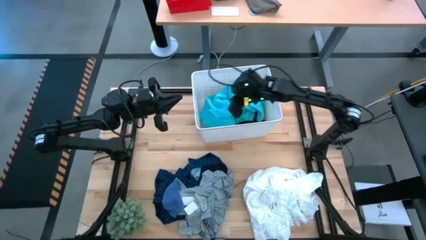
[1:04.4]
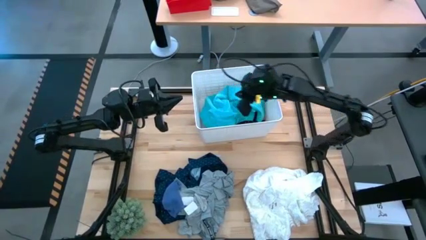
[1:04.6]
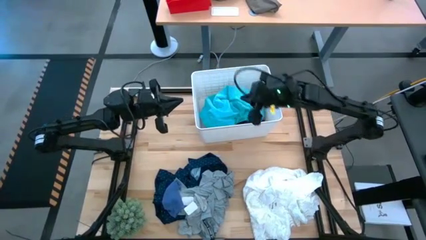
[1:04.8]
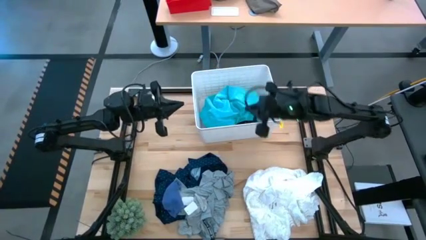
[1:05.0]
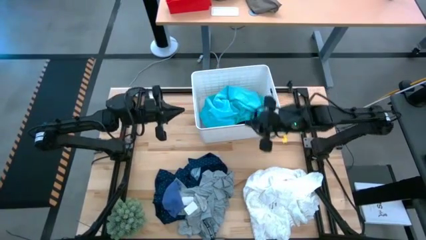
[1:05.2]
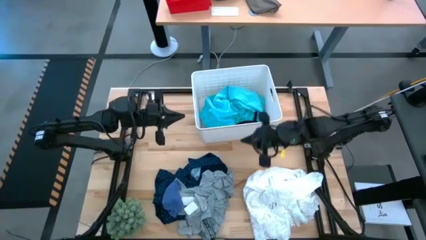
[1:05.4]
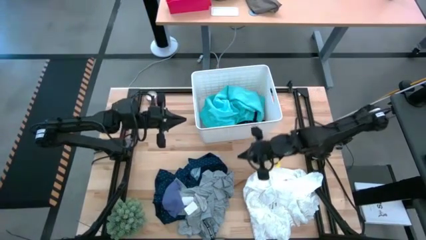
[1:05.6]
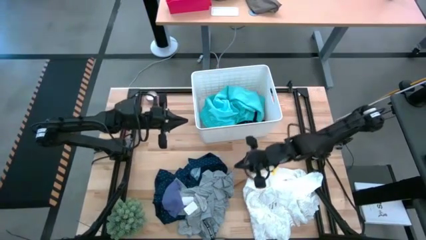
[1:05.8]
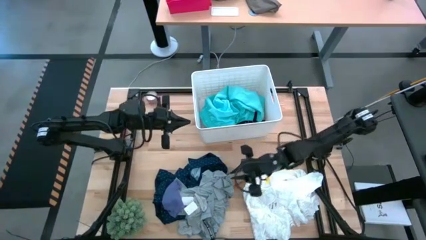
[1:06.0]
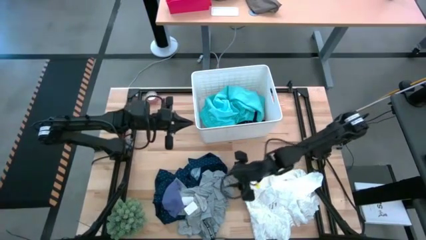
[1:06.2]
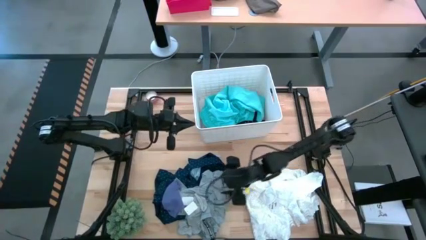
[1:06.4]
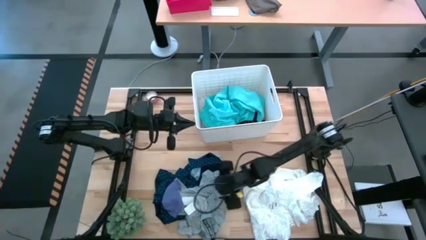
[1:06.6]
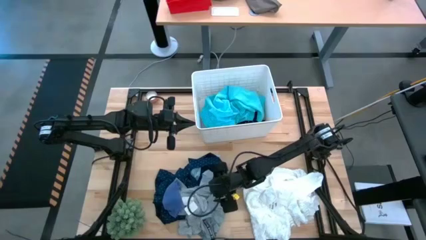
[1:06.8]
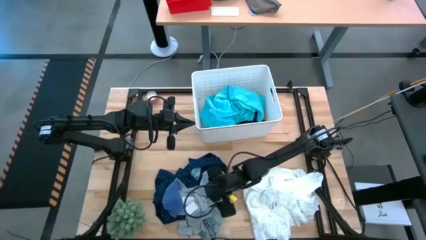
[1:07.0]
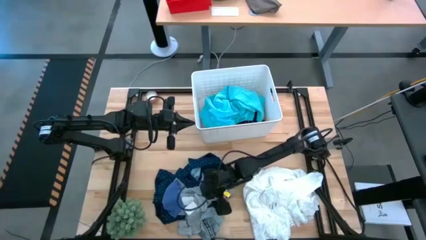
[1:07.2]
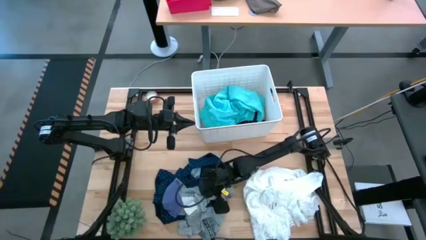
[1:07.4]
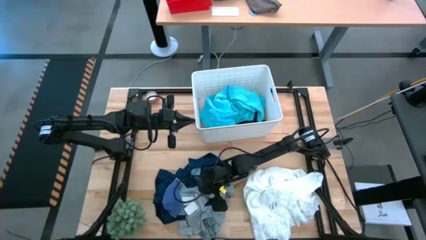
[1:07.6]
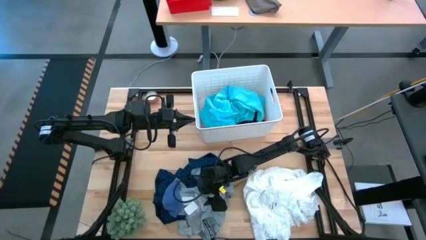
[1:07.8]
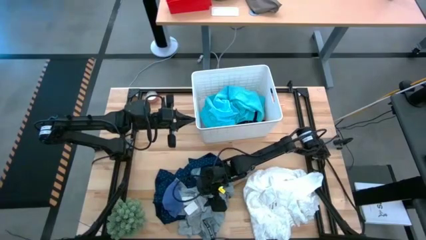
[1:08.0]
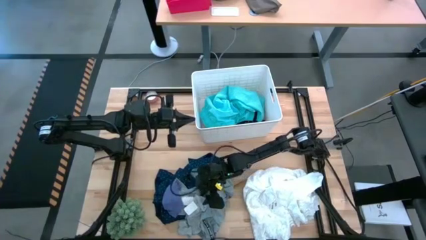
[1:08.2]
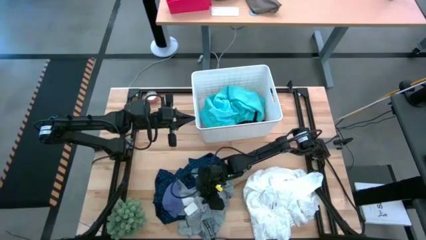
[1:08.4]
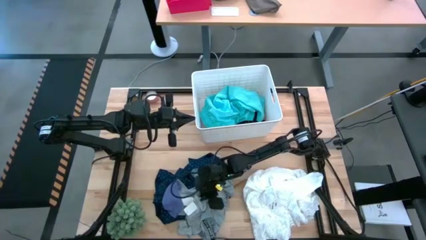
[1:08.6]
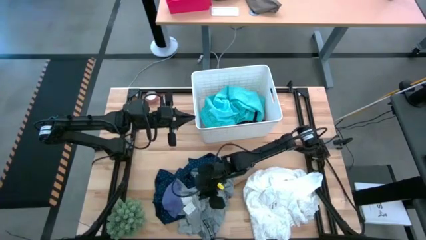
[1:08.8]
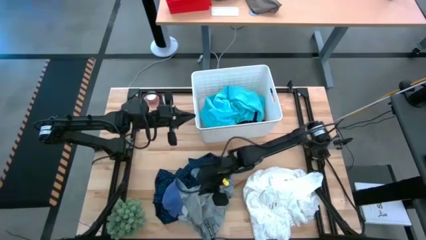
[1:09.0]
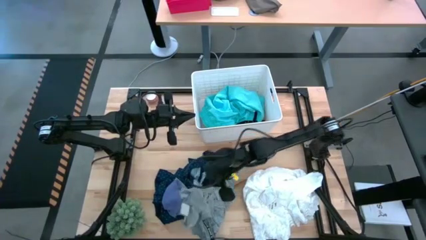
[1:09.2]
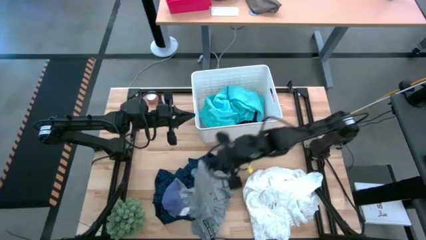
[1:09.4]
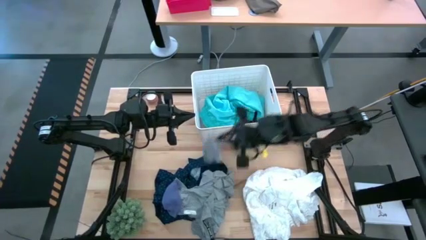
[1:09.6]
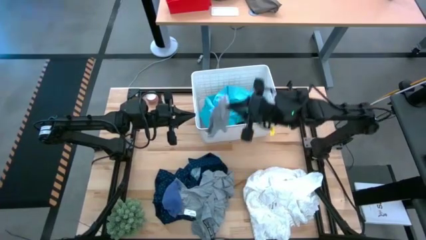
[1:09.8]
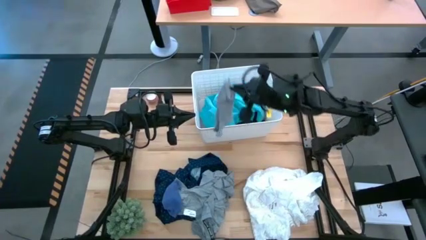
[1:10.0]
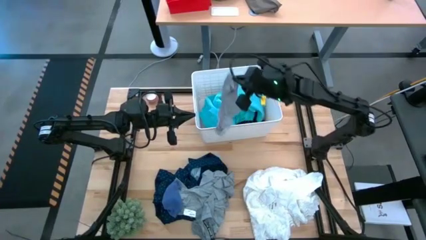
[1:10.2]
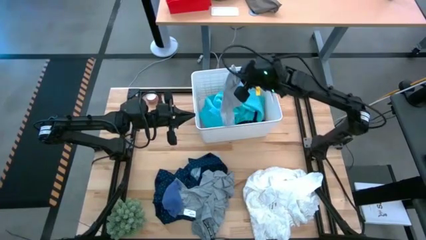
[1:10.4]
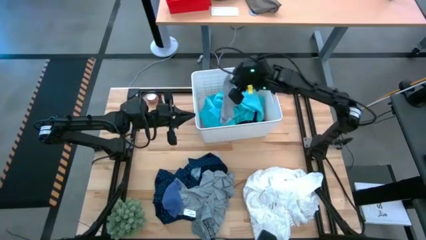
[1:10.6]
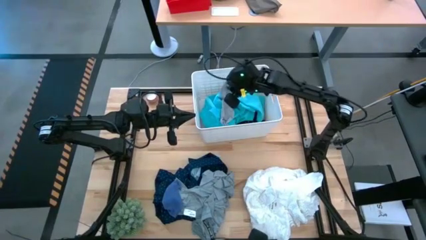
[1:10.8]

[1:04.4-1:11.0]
Task: Sort clothes
Put the gray sock in the bin

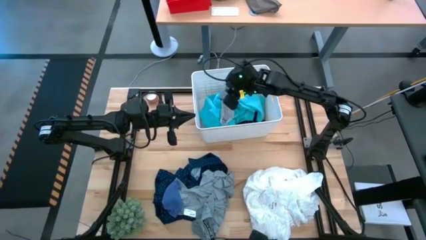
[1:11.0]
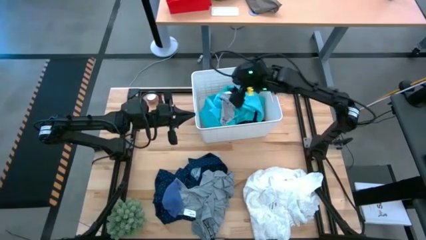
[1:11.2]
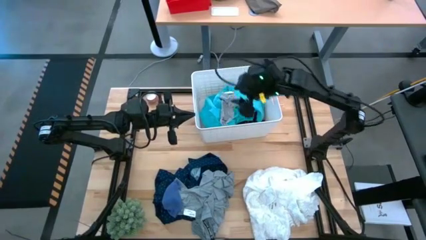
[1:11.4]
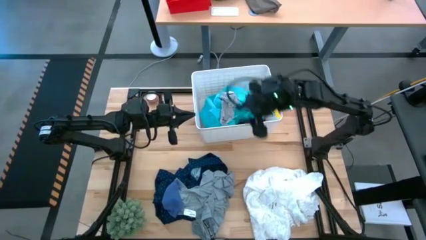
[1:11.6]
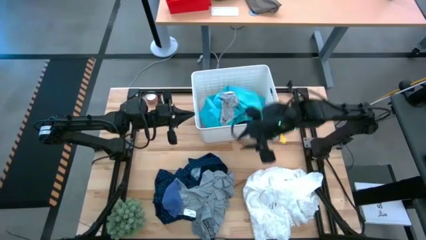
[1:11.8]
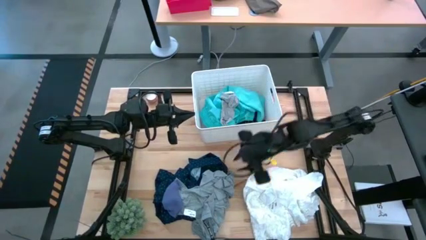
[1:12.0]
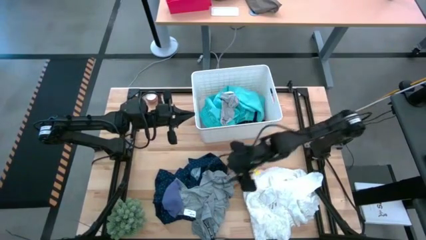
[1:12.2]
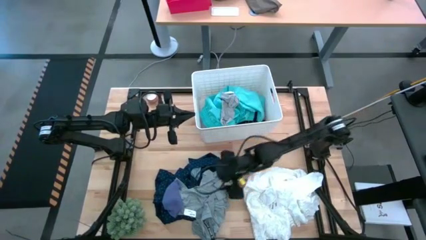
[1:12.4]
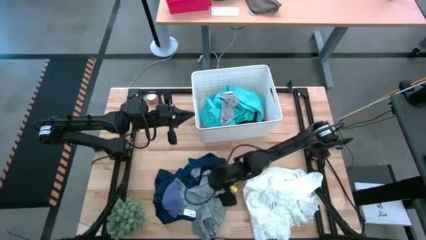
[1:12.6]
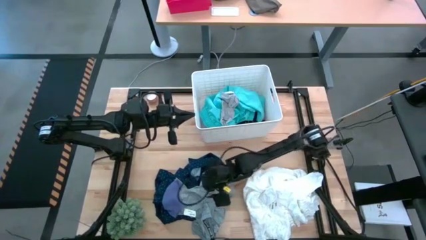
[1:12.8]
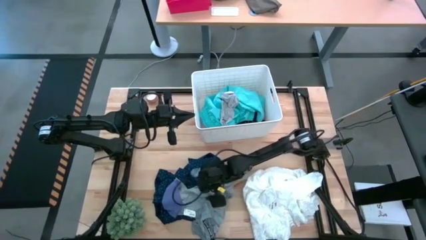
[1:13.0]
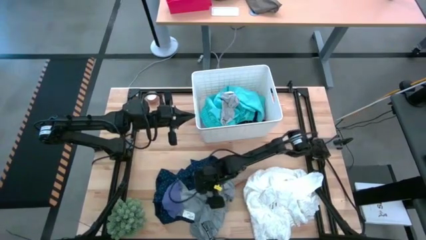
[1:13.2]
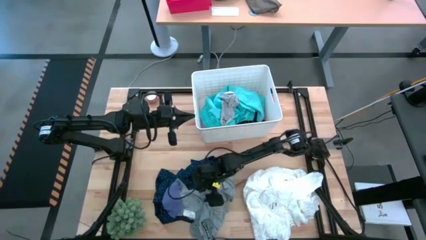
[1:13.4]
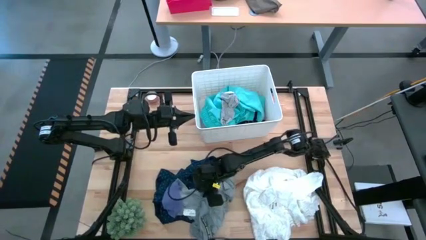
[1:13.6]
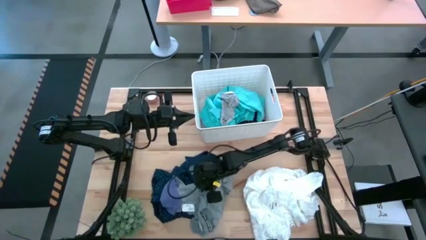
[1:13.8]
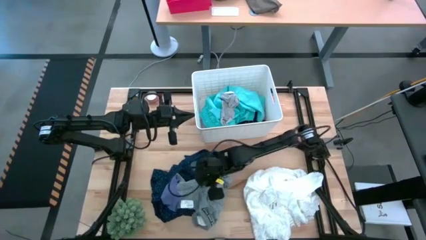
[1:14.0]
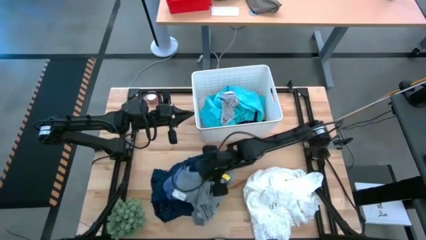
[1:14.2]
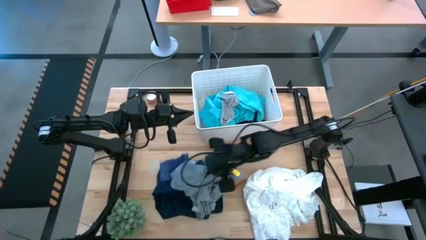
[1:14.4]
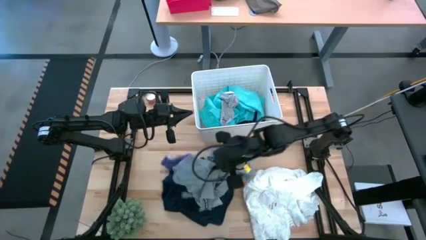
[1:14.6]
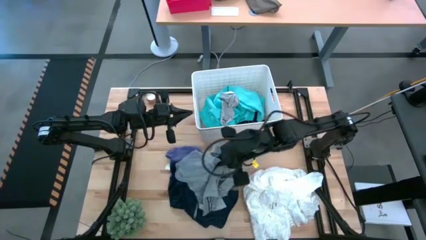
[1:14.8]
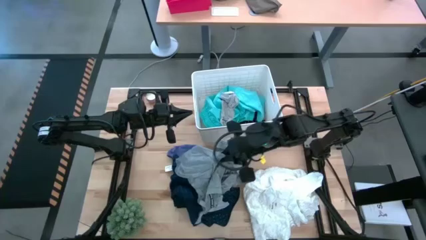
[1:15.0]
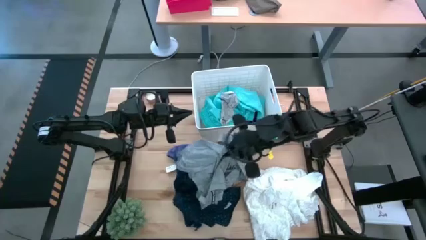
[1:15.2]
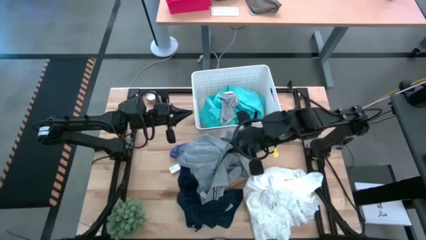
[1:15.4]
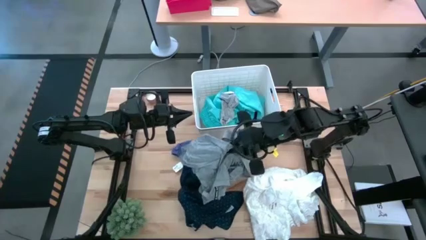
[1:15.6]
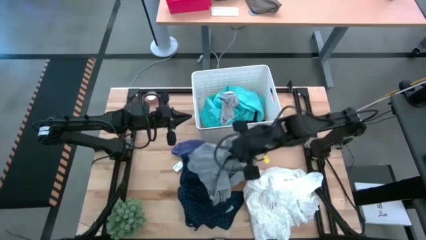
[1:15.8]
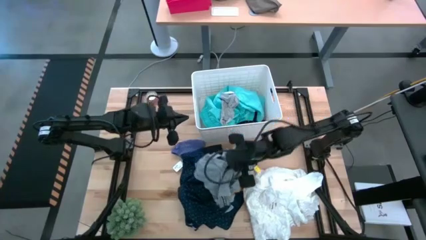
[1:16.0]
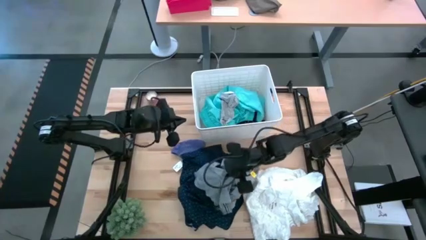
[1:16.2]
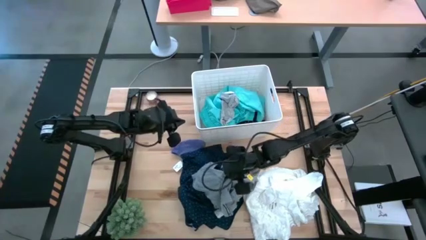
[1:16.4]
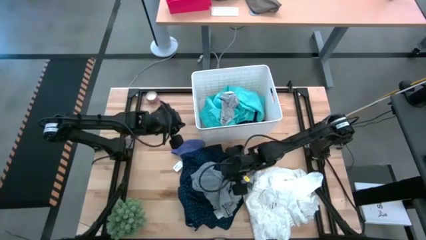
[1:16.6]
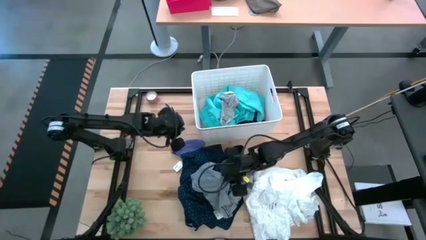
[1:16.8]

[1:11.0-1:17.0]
Put the gray shirt in the bin

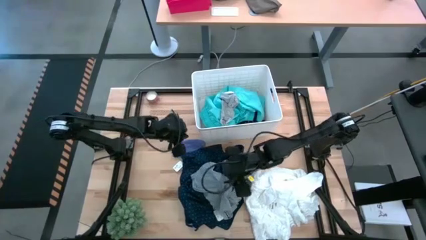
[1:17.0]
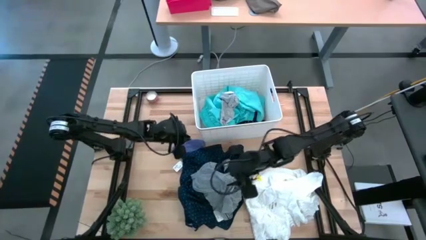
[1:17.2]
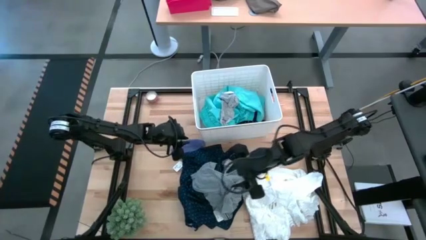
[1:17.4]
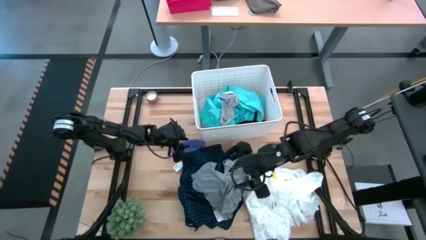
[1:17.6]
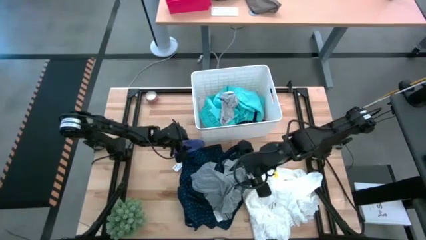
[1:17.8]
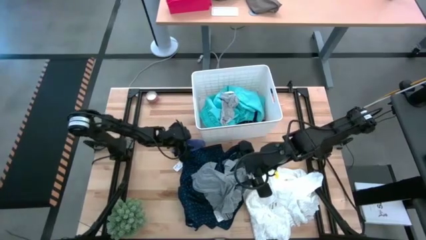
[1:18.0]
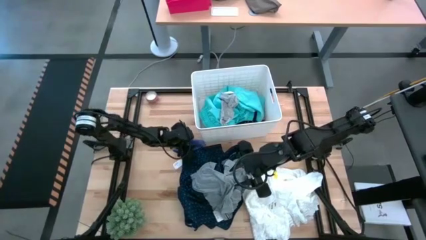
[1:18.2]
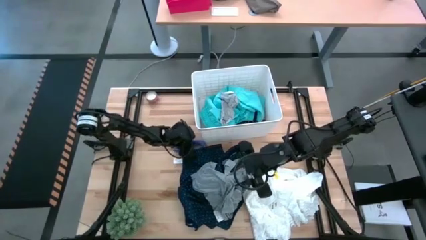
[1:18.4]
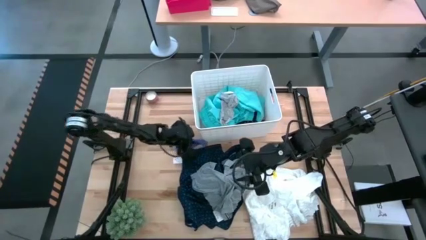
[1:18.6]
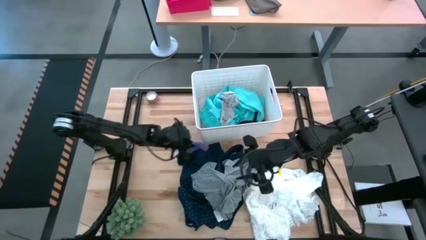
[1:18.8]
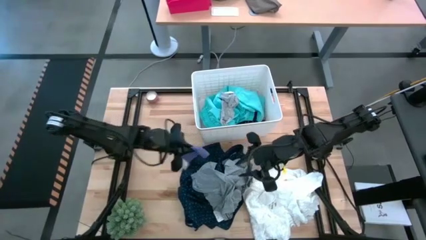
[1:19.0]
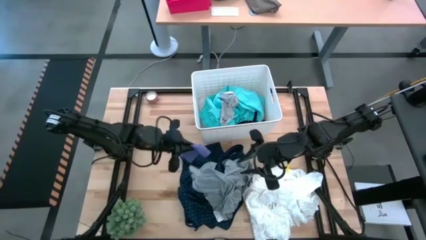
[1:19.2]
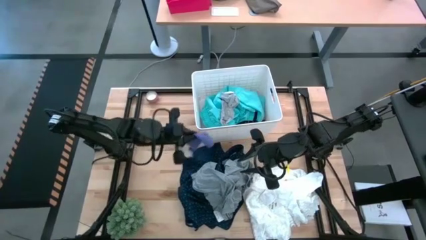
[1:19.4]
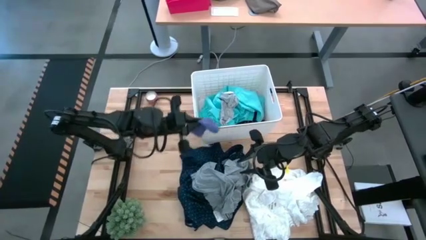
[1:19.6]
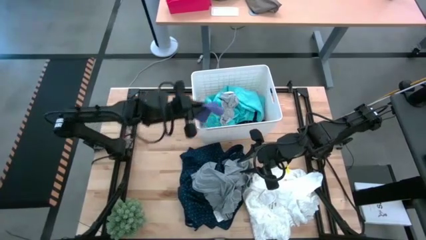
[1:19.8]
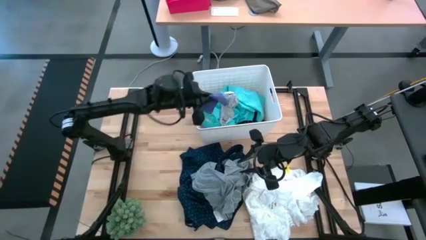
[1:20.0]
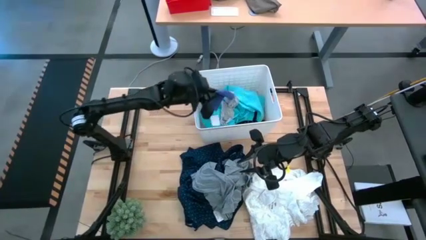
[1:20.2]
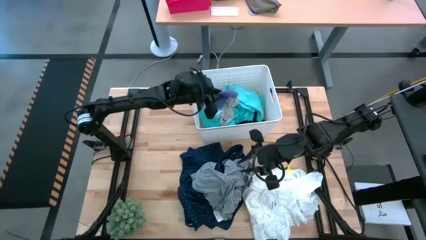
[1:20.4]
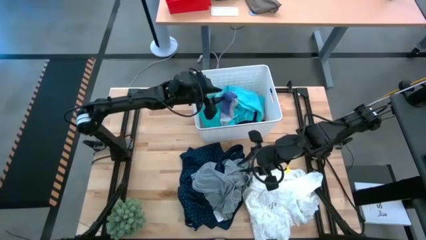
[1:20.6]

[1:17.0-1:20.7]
Put the purple sock in the bin
